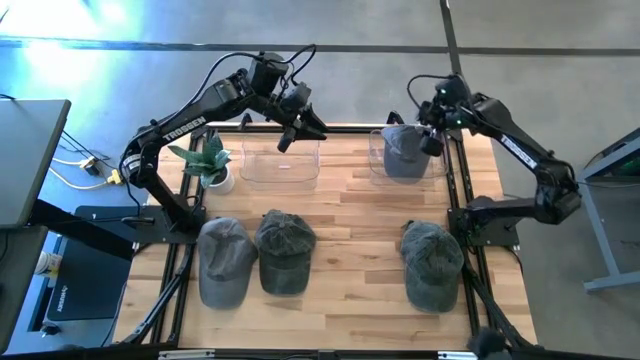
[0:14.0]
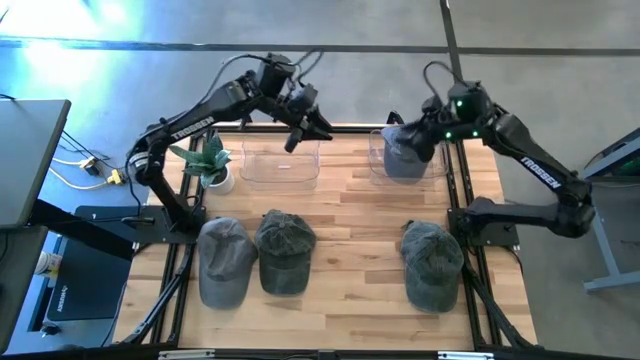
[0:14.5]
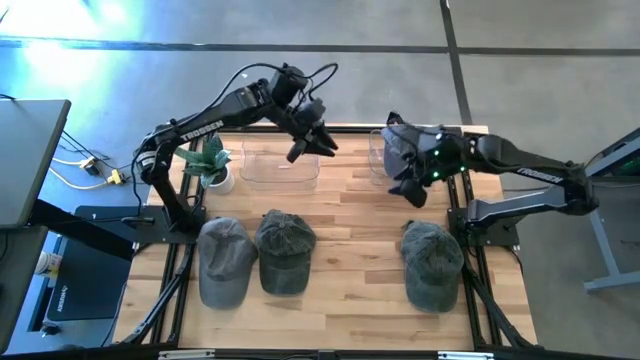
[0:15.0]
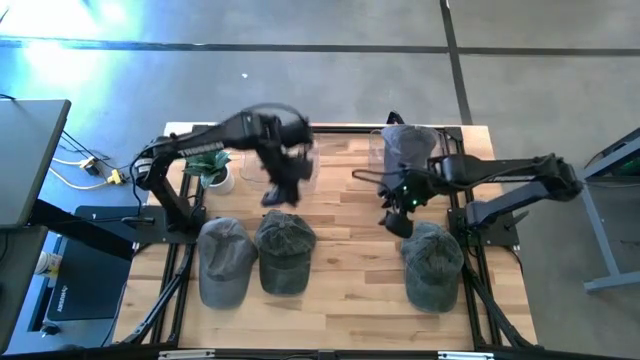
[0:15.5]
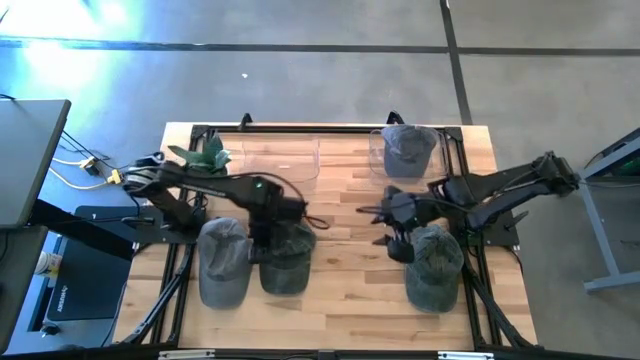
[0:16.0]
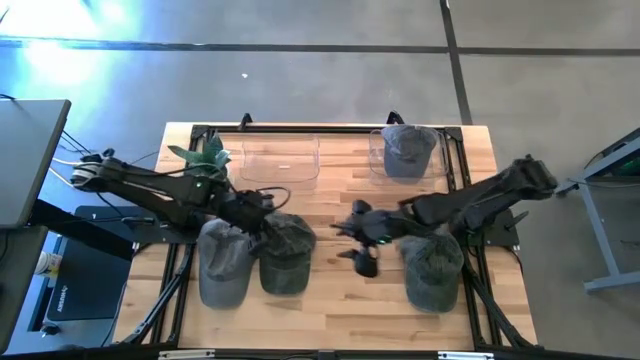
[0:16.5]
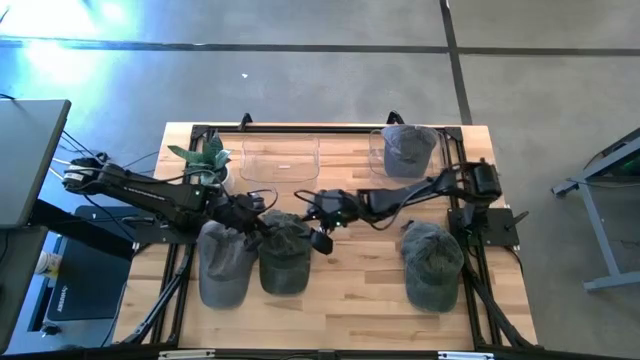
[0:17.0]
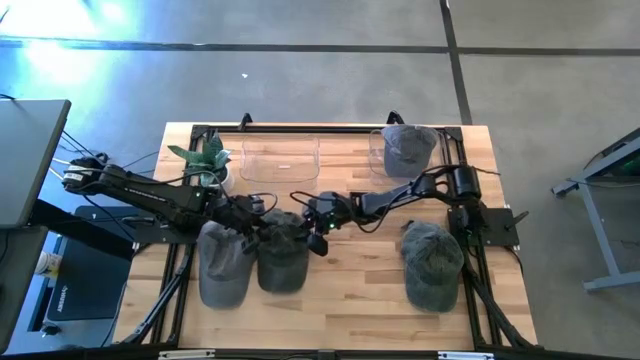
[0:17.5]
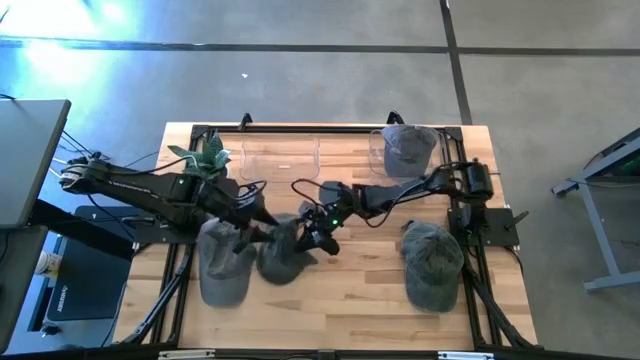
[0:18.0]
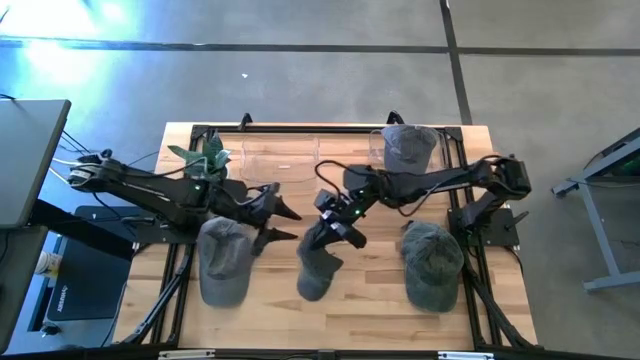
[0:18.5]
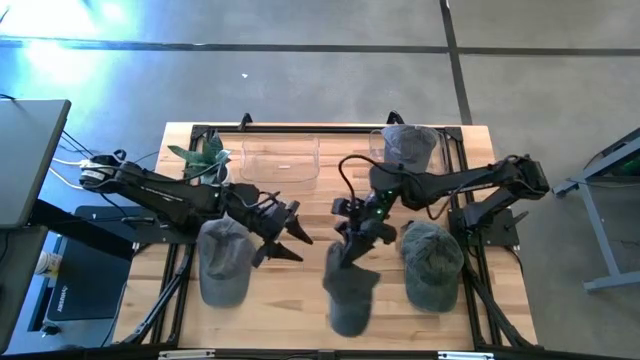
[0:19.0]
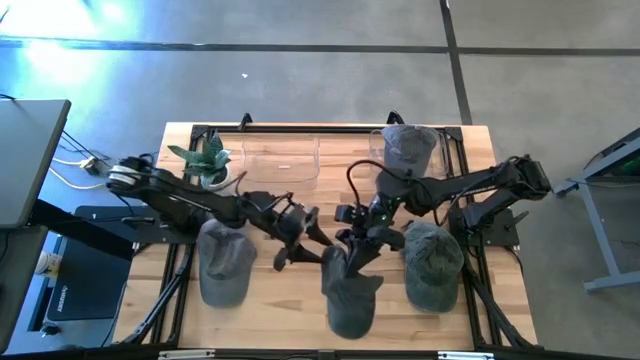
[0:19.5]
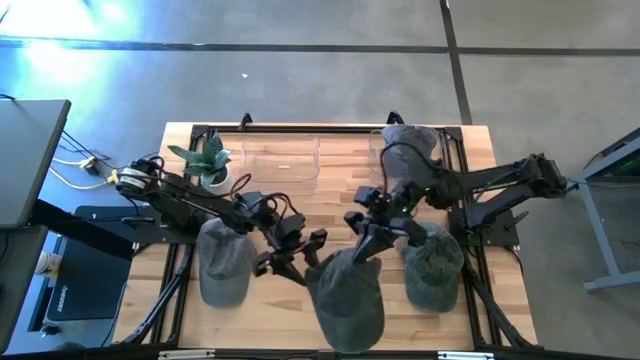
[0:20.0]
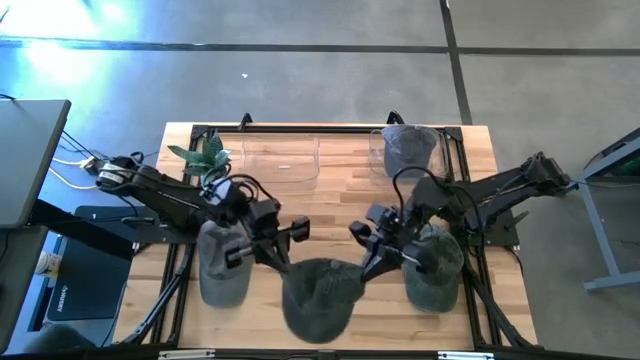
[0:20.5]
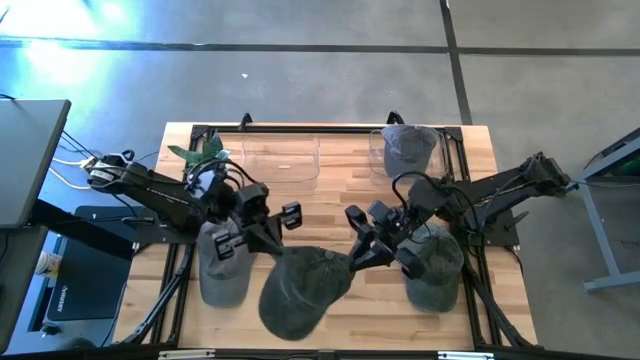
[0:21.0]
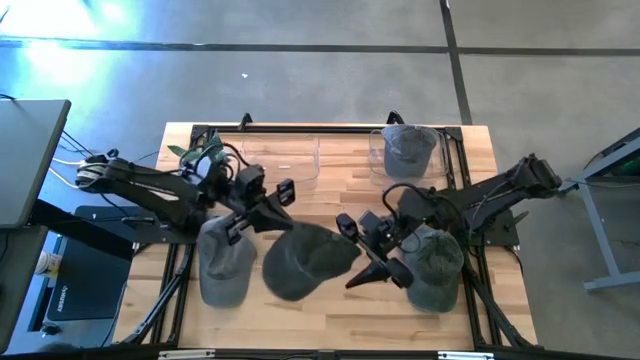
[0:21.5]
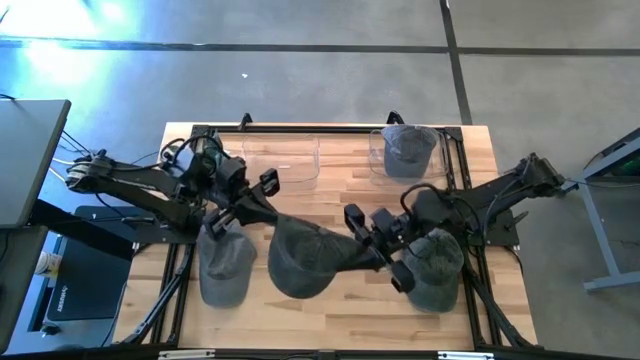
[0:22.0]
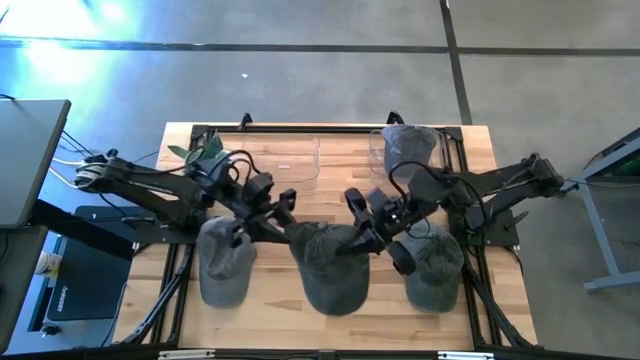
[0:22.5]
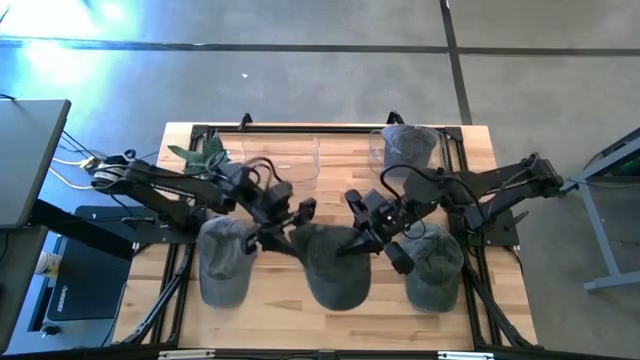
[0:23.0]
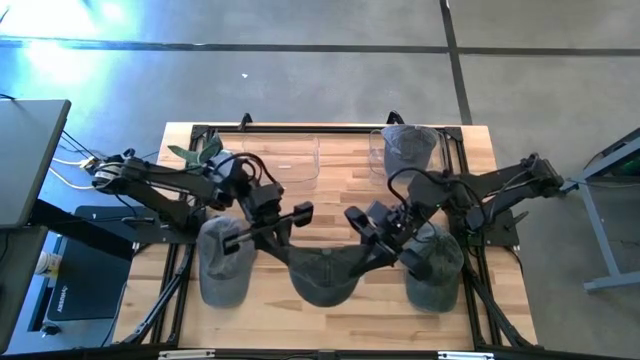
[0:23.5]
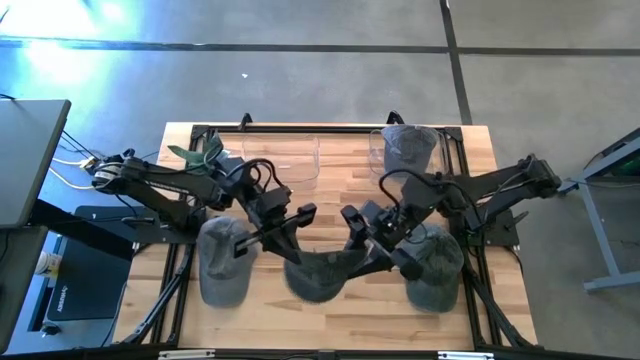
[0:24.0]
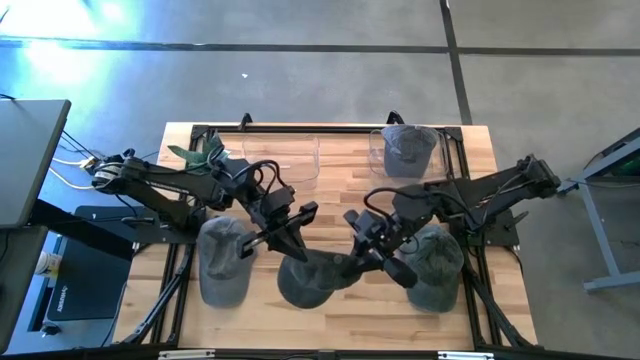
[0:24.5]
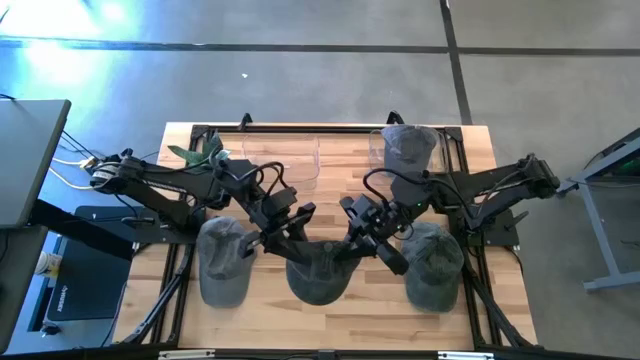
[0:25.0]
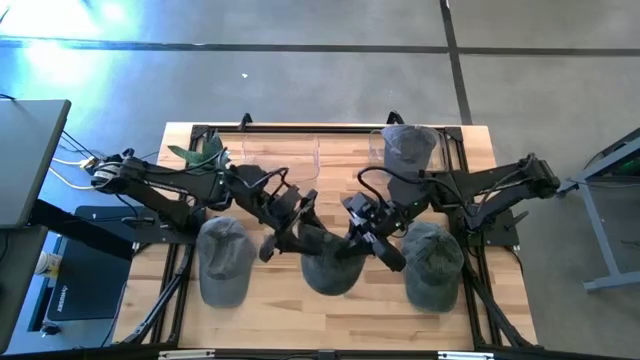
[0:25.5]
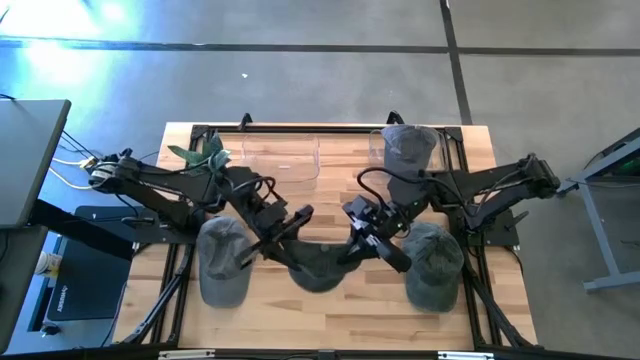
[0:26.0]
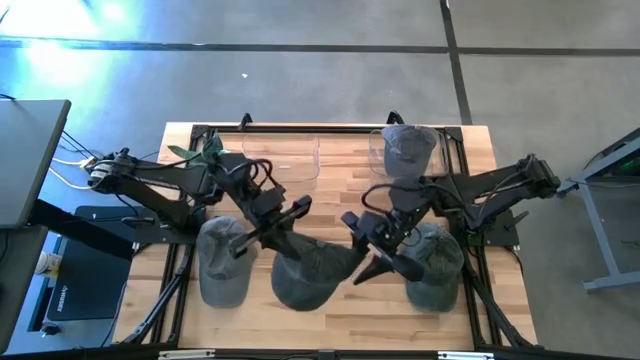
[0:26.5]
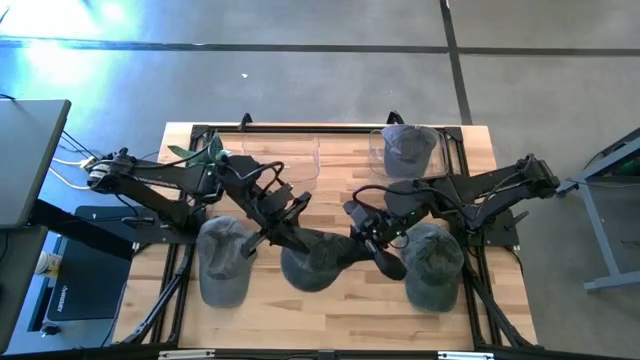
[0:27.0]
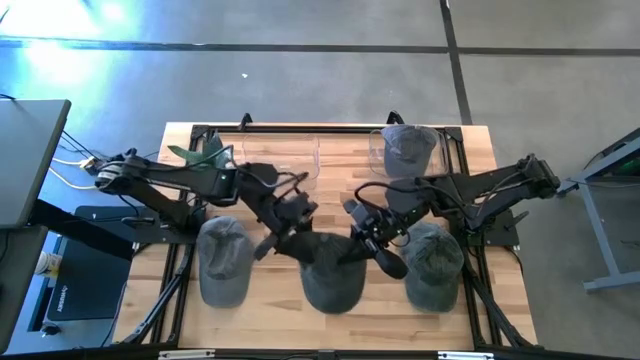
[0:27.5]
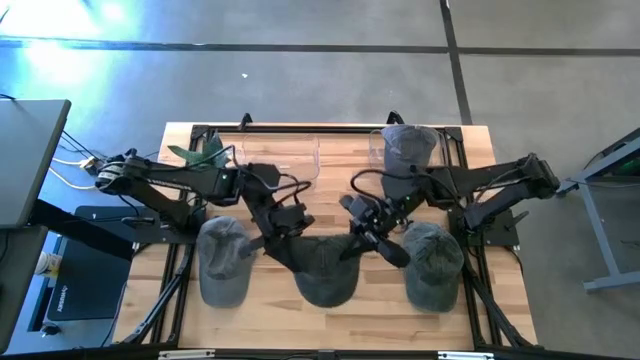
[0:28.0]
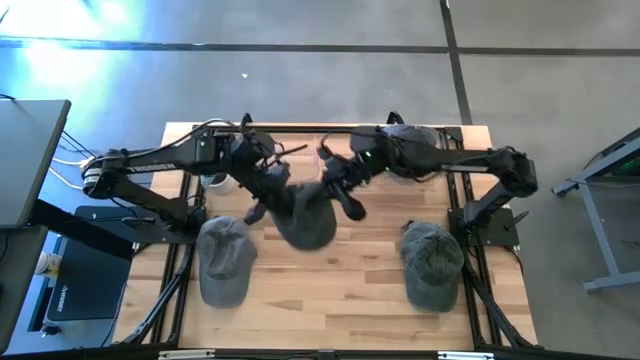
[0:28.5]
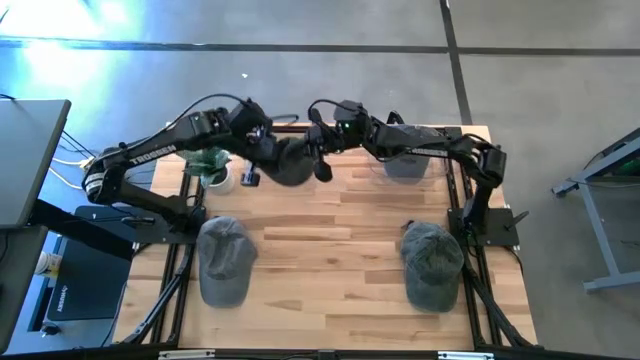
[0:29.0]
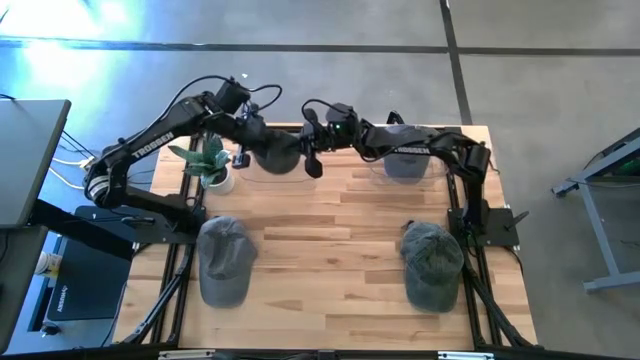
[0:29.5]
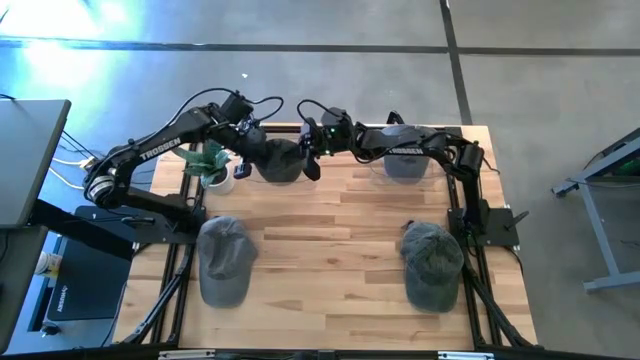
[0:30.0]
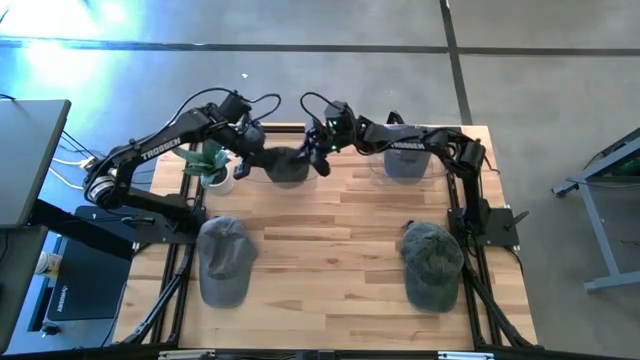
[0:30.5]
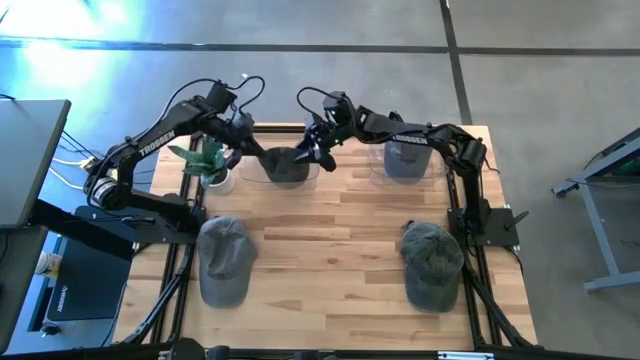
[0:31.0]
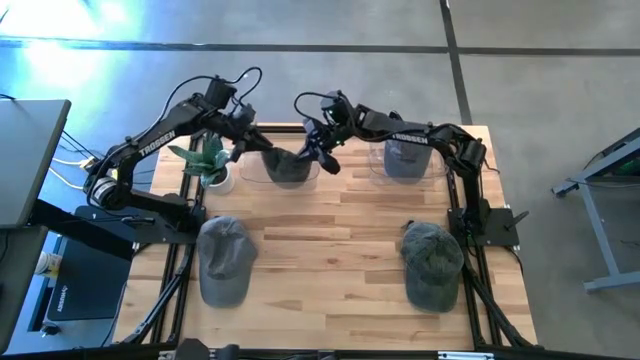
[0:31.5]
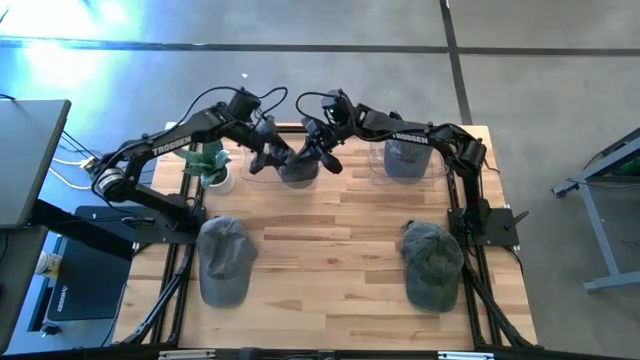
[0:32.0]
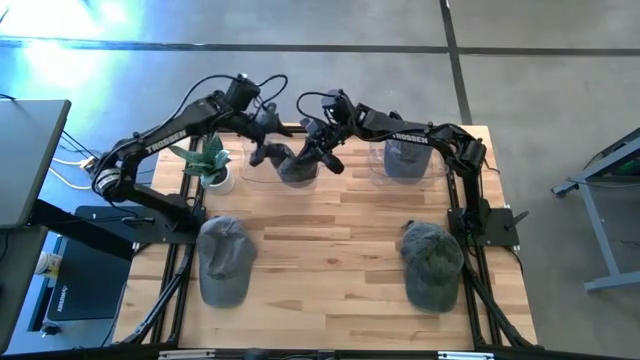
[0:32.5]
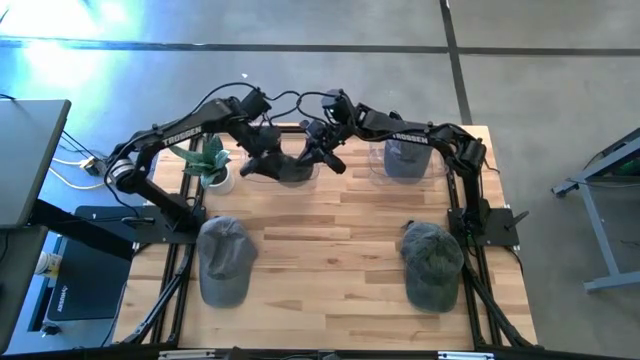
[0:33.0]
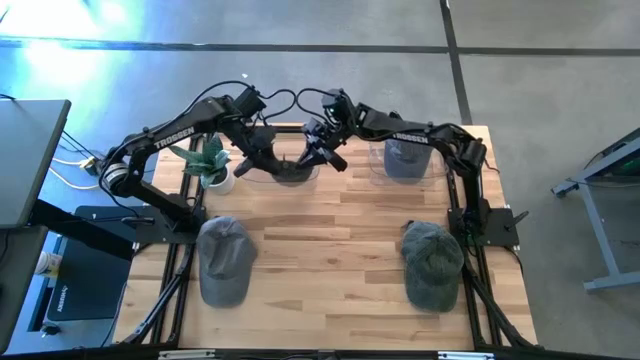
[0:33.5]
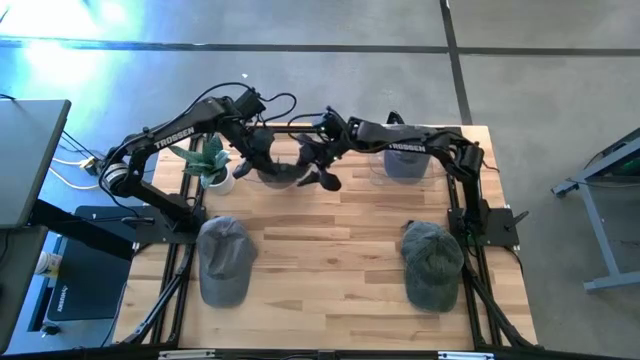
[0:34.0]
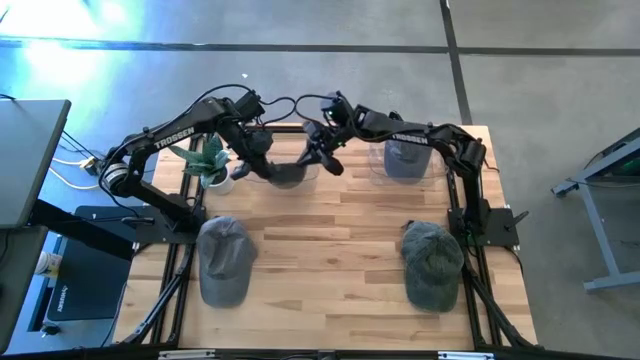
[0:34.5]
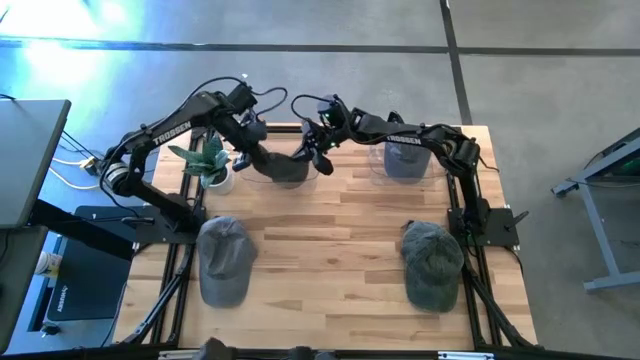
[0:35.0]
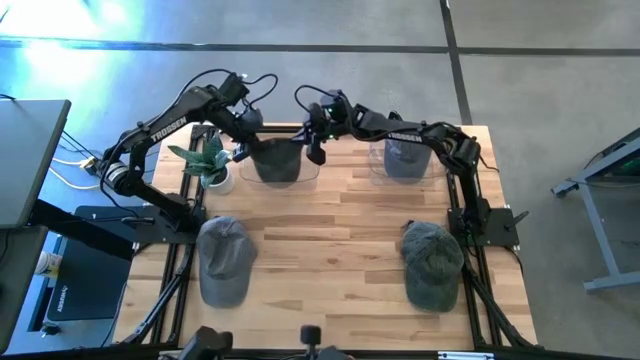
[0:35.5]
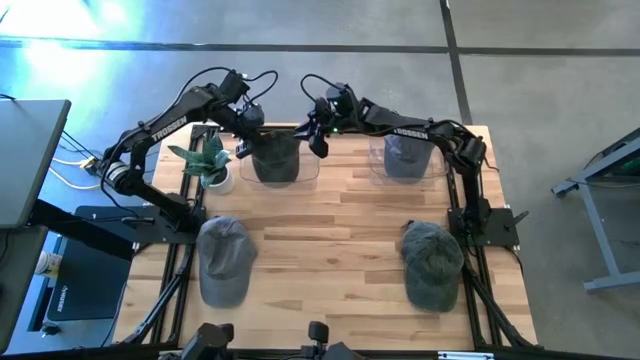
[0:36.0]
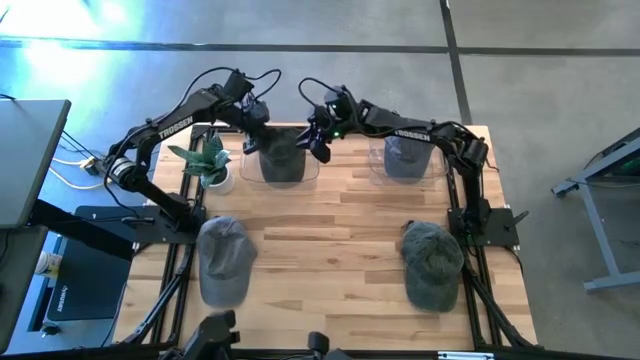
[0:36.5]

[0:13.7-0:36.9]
Task: Pick & Place hat
Put the left blue cap into the left transparent bin
